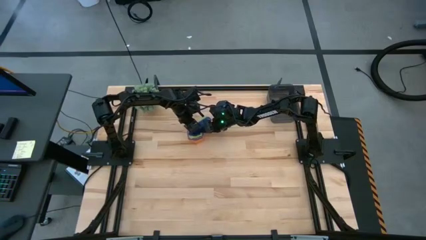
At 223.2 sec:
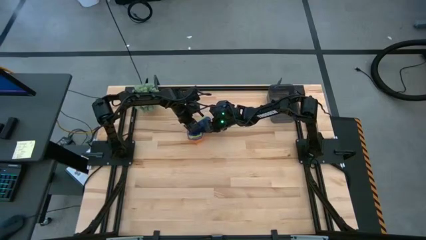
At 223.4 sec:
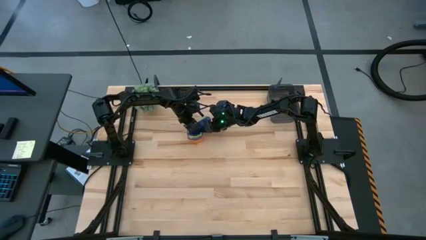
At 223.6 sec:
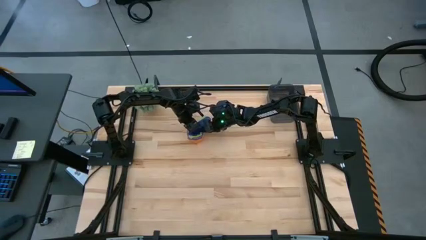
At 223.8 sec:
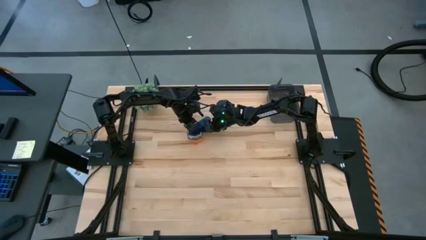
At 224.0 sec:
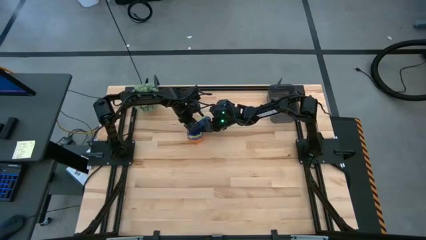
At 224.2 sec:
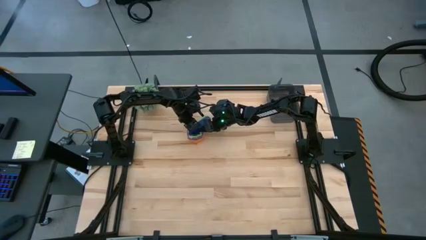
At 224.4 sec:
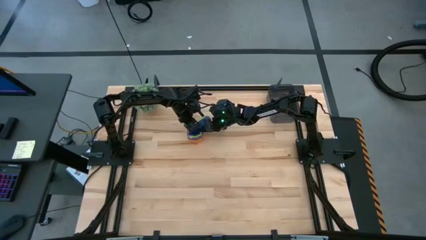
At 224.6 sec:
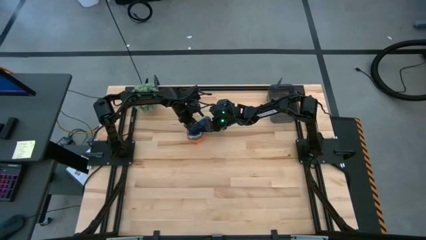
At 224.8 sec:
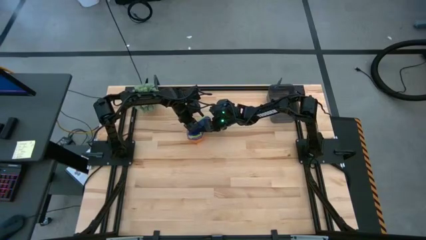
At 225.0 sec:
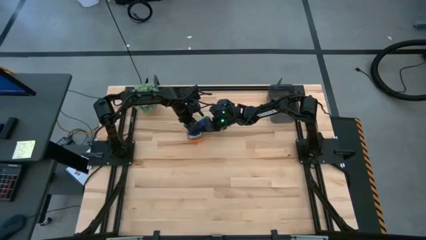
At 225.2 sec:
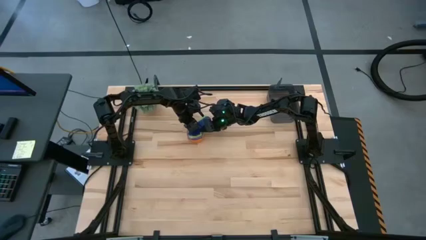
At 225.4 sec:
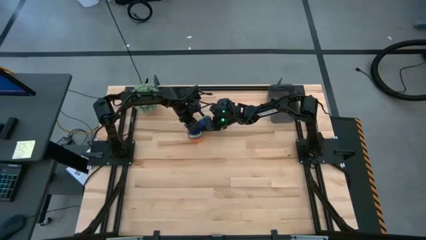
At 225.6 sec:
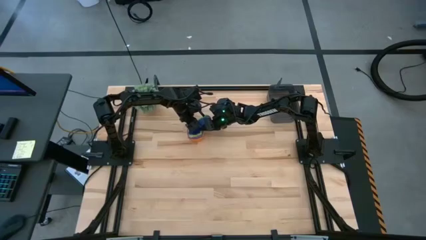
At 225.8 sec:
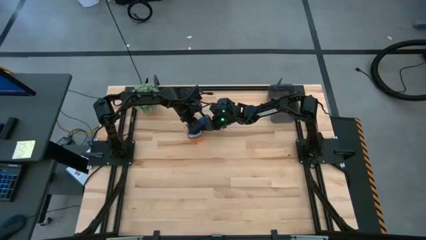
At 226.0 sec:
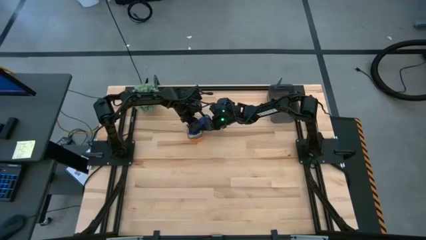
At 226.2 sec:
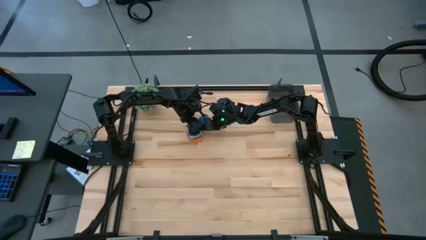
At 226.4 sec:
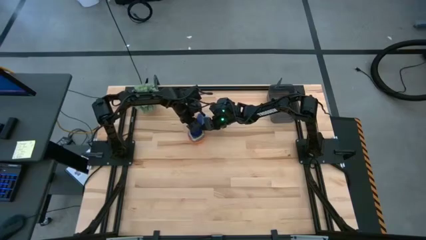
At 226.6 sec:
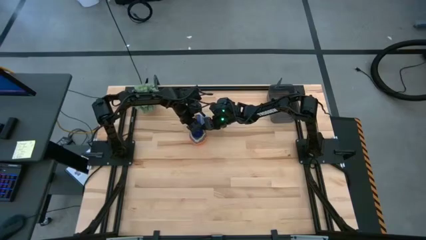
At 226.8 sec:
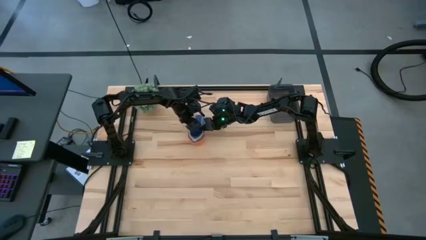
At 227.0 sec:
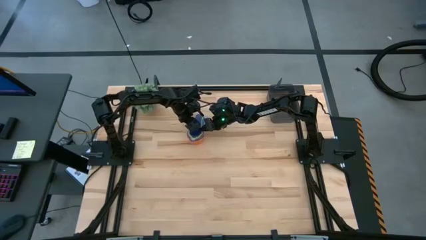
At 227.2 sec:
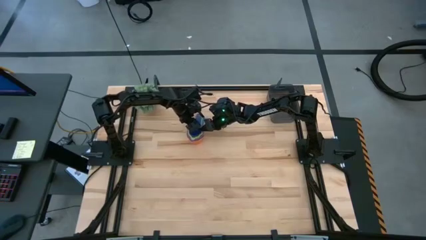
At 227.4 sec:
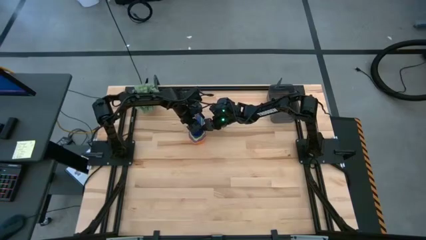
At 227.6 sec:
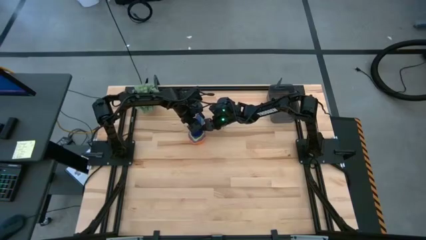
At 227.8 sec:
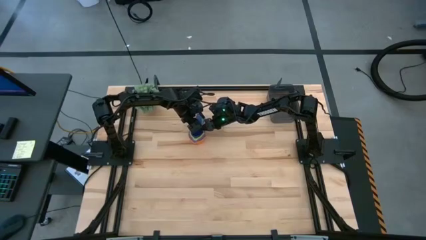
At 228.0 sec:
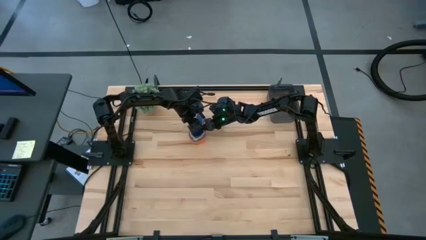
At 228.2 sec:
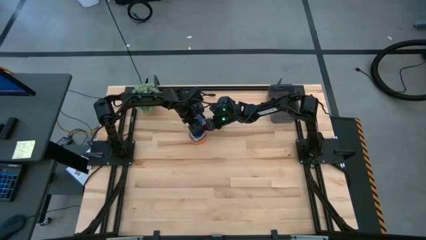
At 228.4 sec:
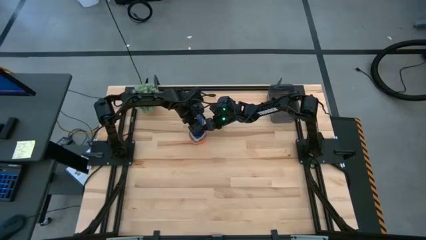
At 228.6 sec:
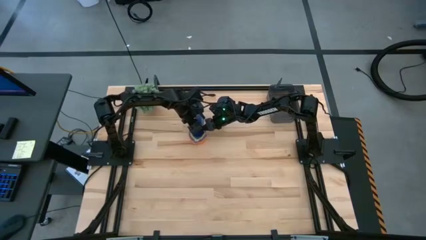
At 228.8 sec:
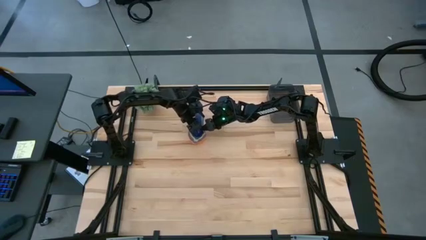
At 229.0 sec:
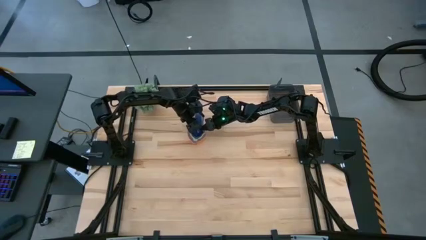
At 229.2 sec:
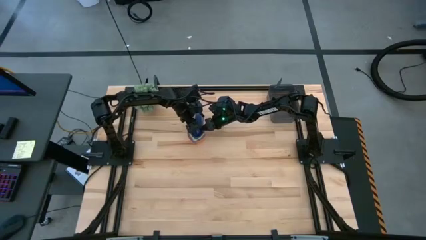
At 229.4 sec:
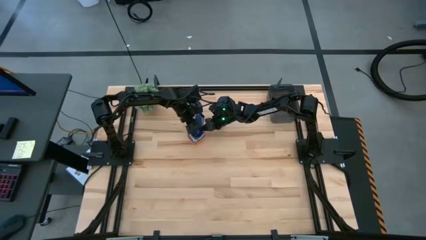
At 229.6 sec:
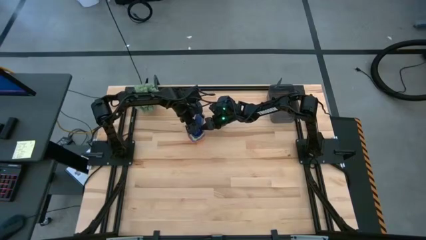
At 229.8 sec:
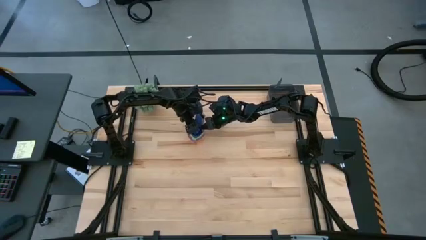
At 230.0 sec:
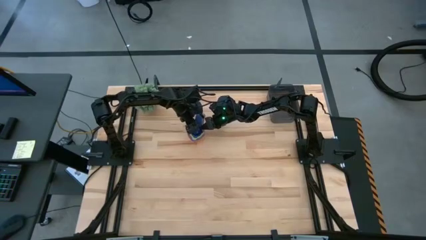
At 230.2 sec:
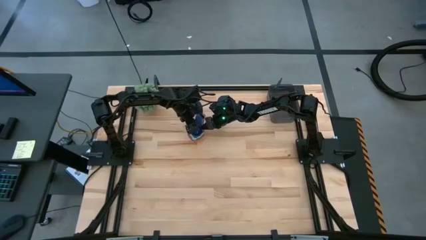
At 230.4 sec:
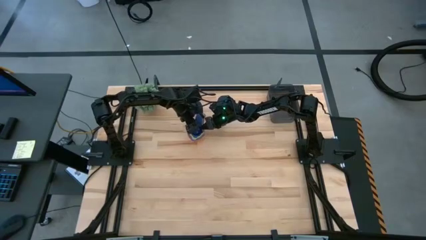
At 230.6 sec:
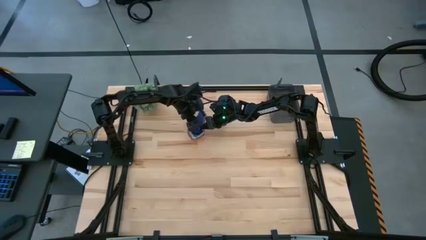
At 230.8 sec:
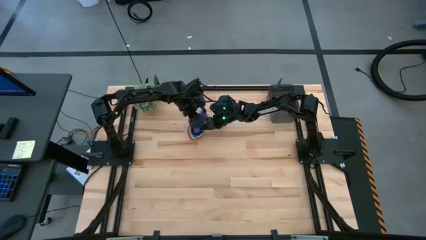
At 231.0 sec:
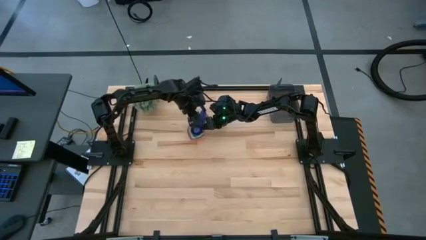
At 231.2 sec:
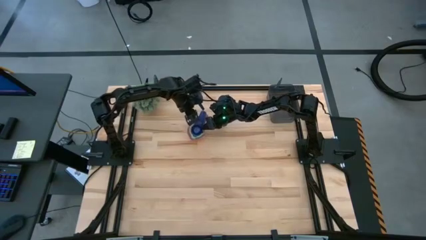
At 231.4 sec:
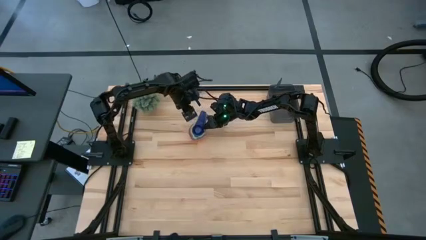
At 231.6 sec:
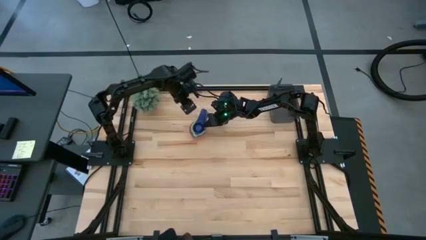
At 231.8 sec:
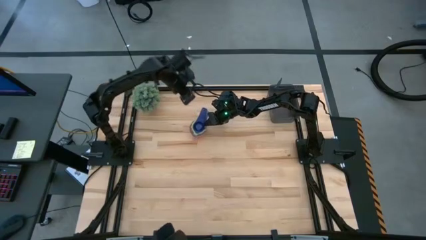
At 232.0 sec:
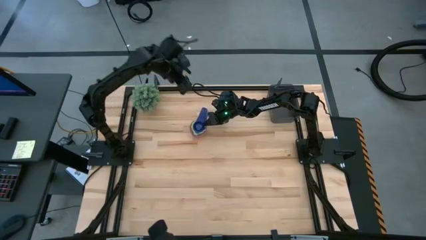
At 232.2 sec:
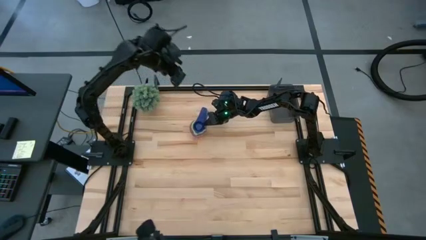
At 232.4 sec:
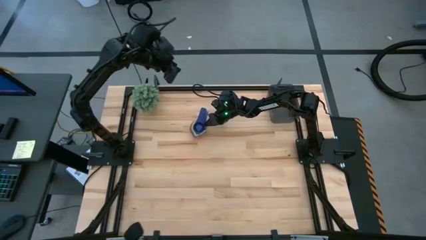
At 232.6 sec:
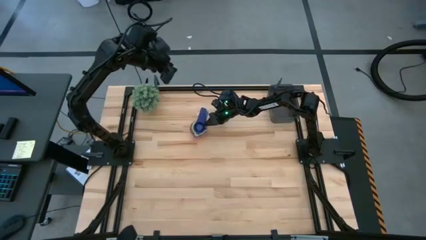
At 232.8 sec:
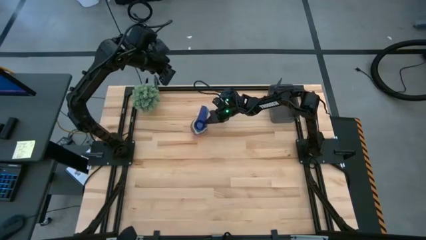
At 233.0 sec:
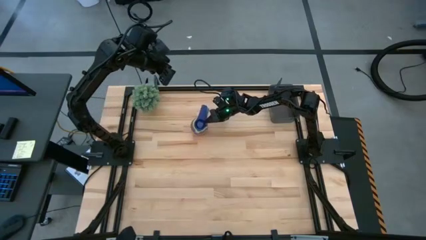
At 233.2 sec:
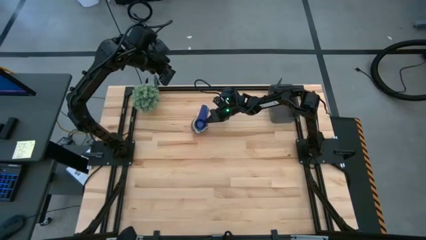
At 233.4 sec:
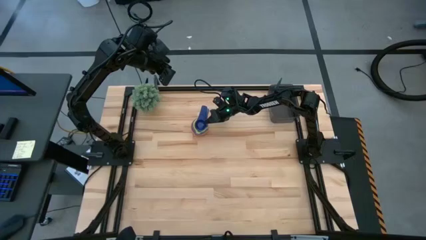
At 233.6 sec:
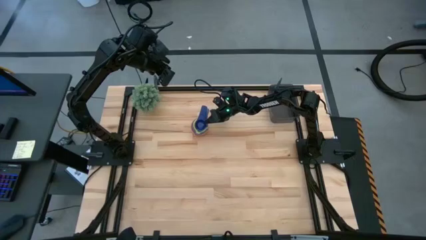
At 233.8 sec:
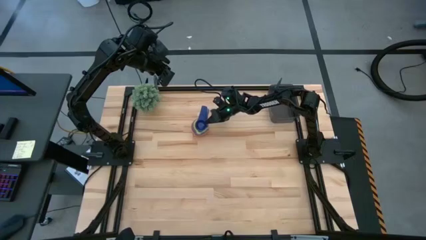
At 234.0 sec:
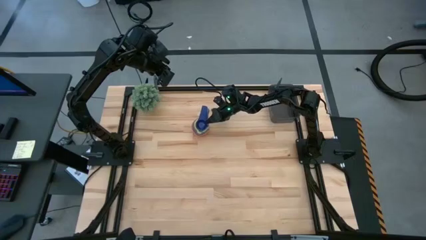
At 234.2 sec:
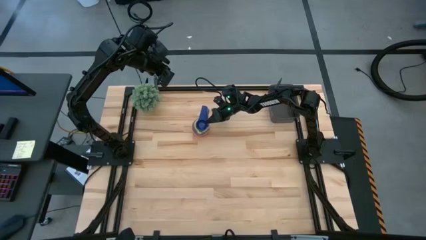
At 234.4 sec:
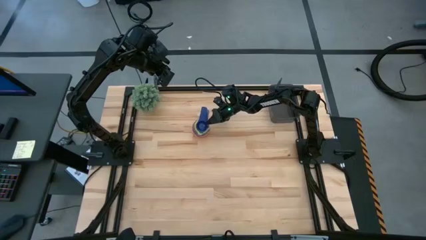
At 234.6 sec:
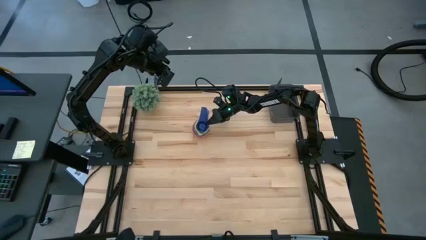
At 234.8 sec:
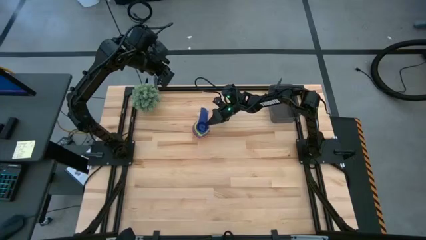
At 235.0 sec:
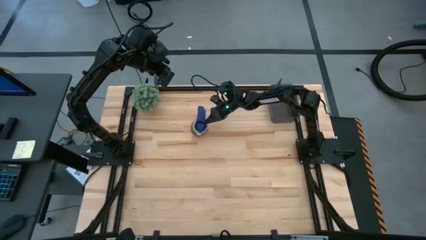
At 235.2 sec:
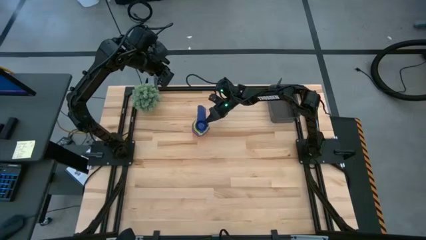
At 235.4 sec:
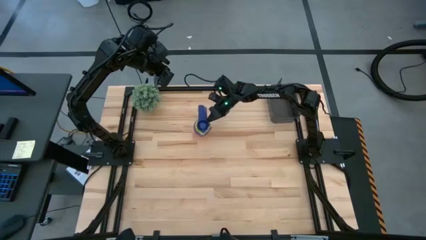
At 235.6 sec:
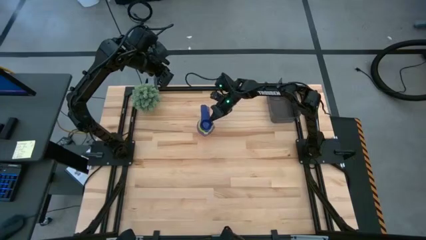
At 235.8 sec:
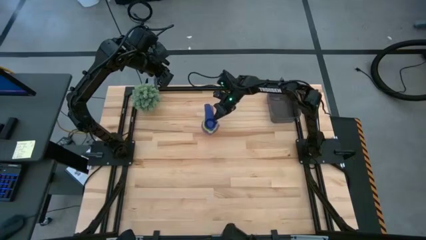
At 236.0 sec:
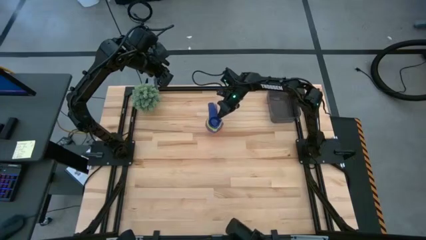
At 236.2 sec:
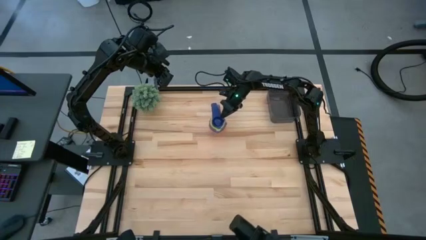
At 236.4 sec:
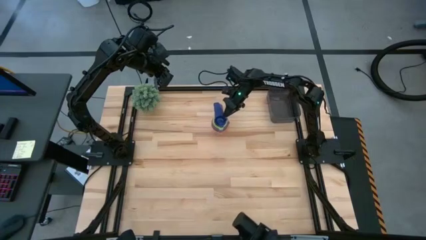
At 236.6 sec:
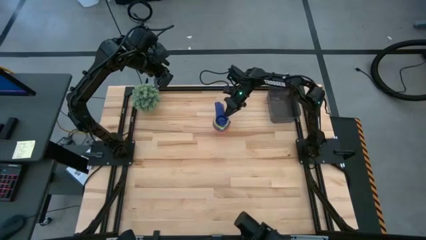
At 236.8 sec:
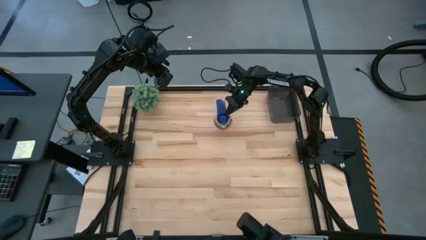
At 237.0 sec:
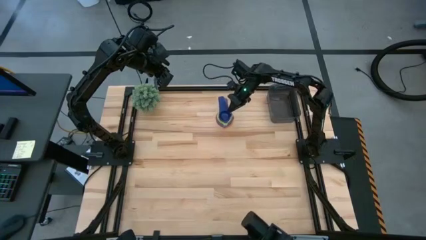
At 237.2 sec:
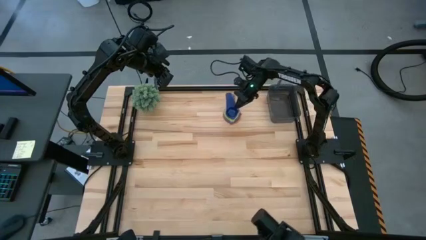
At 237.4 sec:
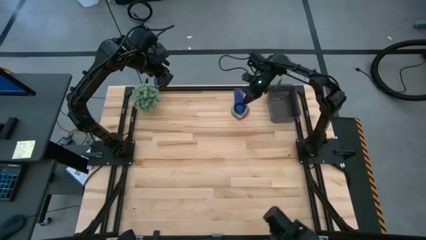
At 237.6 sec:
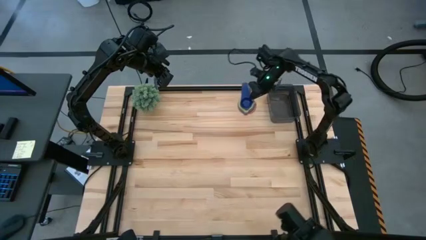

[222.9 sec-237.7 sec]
Task: Nest measuring cups in basket
Put the nested measuring cups into the black bin
